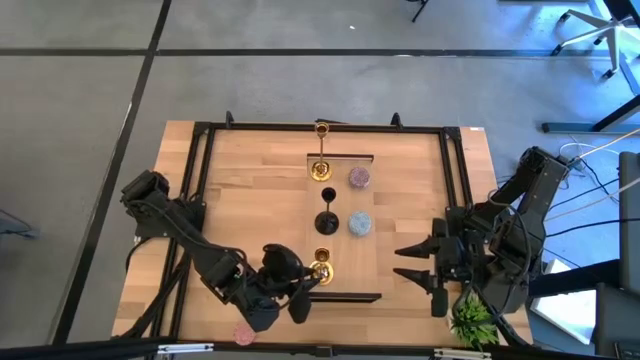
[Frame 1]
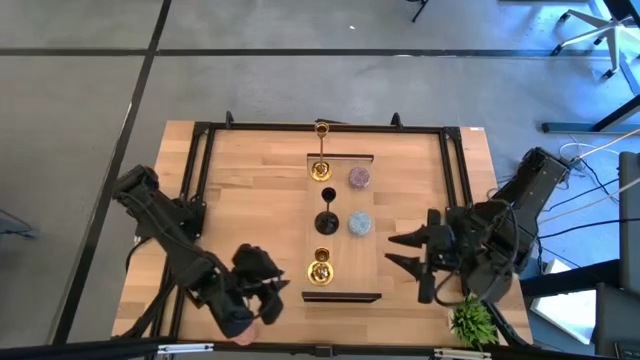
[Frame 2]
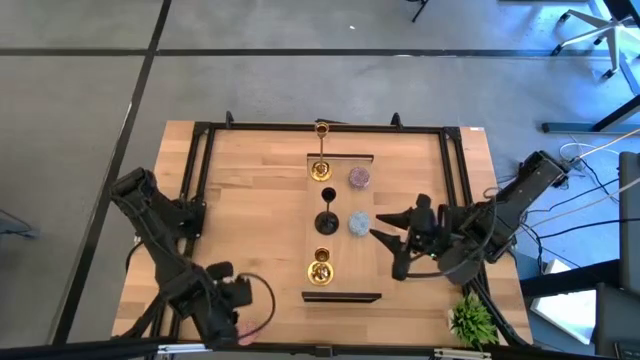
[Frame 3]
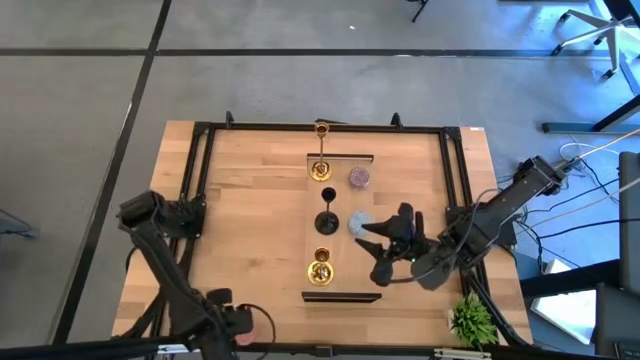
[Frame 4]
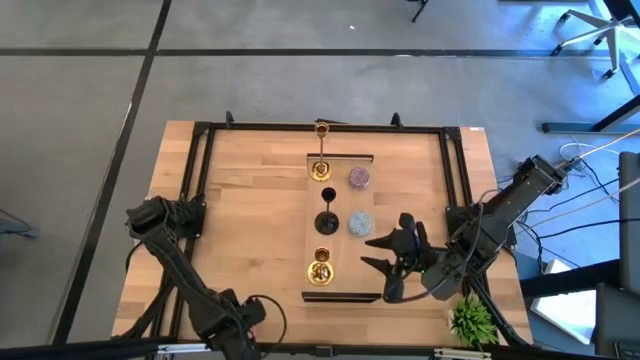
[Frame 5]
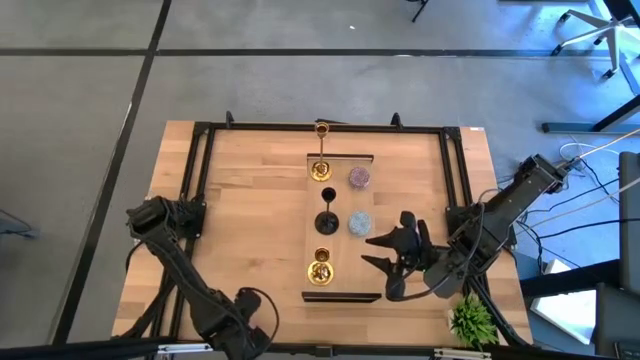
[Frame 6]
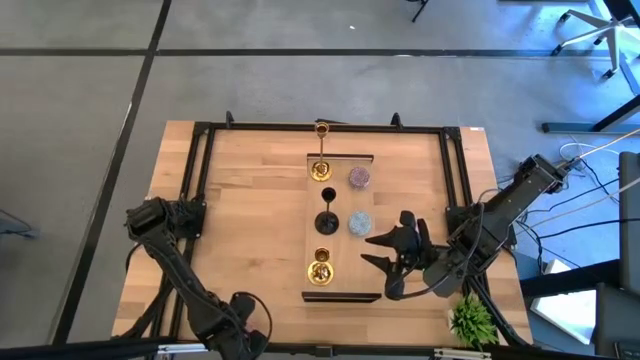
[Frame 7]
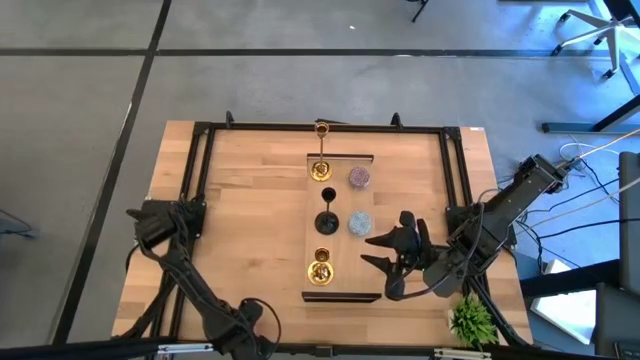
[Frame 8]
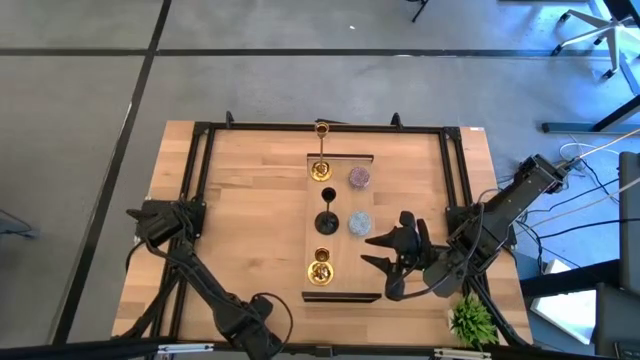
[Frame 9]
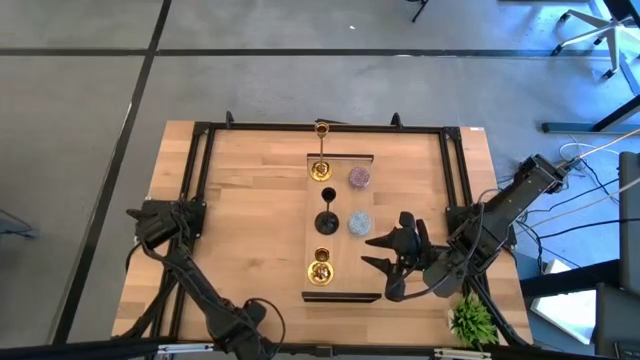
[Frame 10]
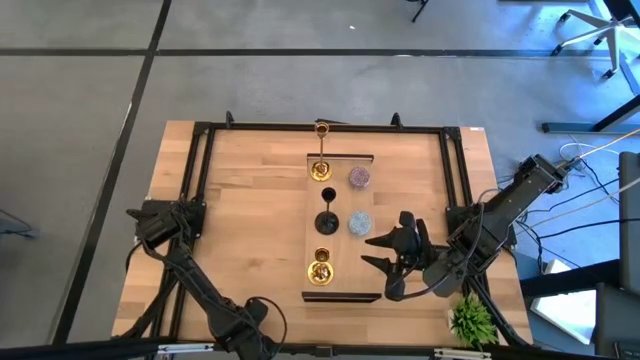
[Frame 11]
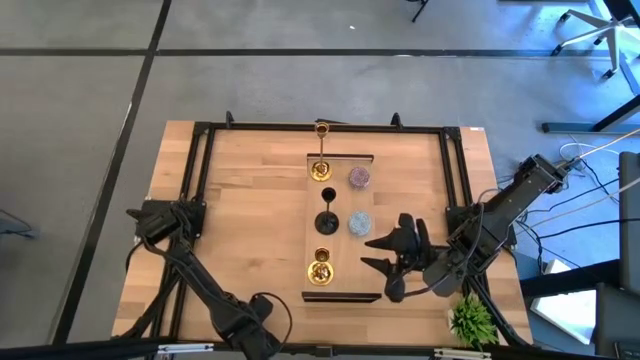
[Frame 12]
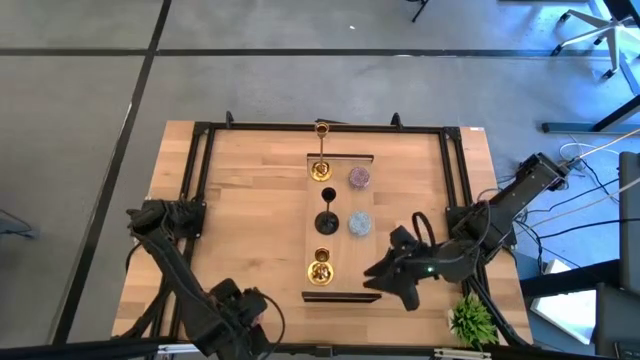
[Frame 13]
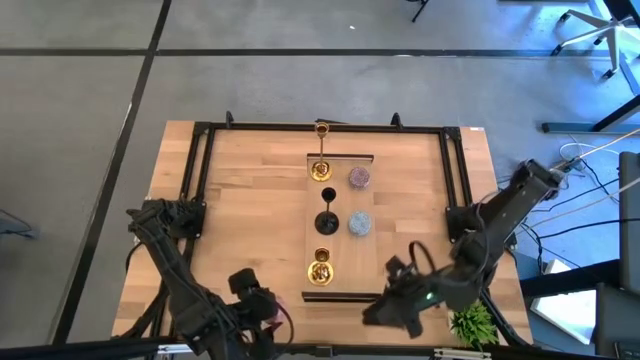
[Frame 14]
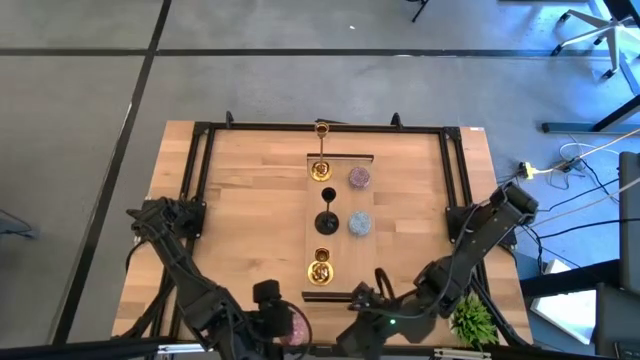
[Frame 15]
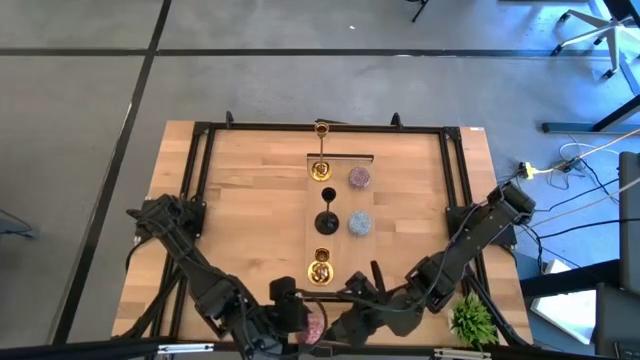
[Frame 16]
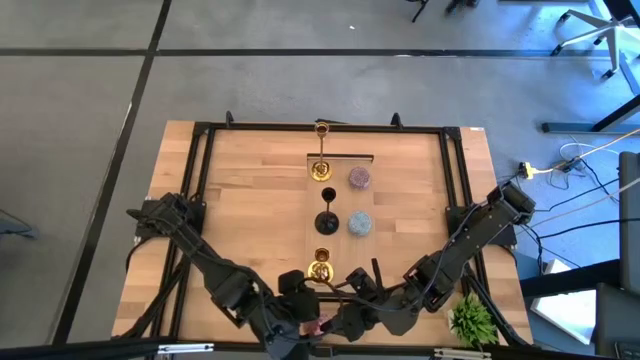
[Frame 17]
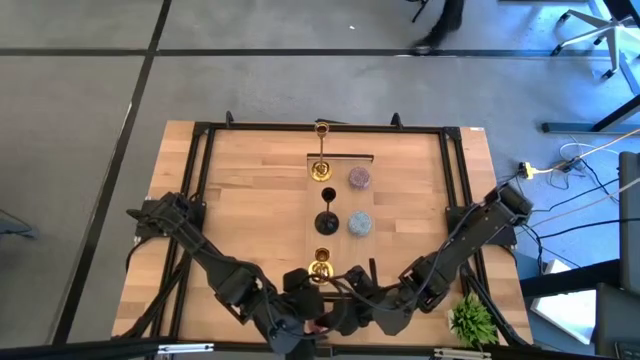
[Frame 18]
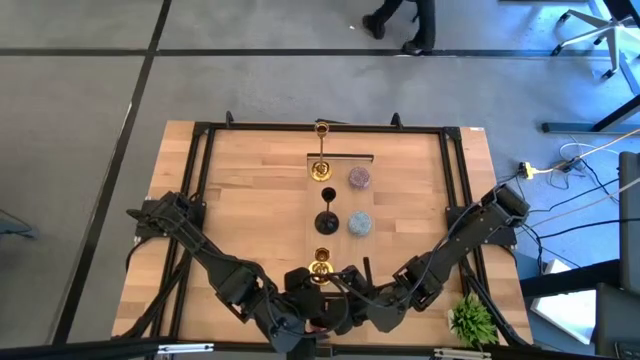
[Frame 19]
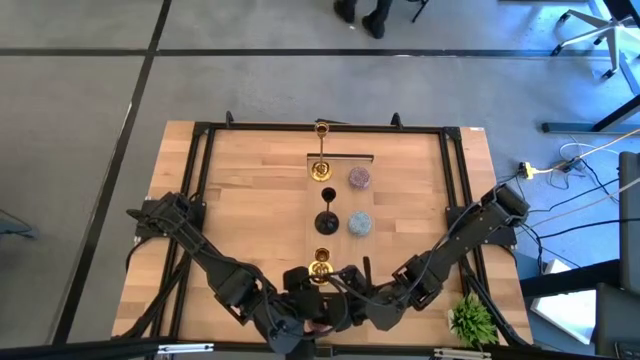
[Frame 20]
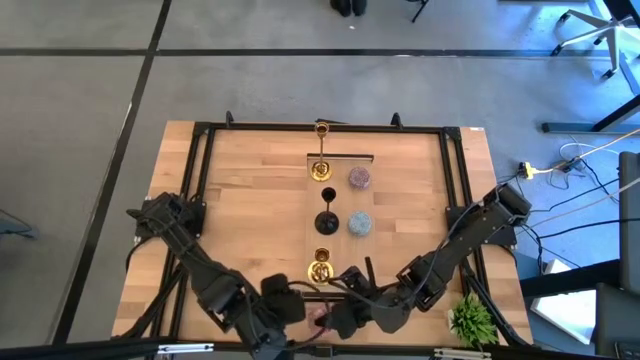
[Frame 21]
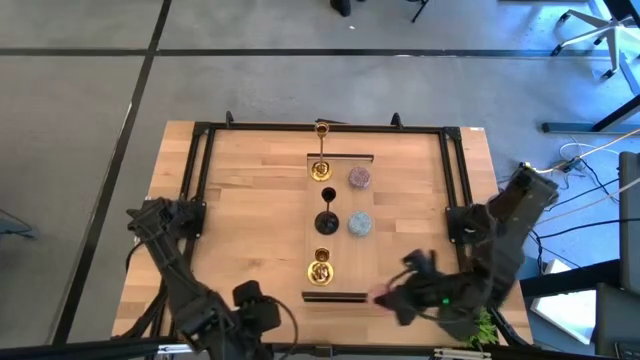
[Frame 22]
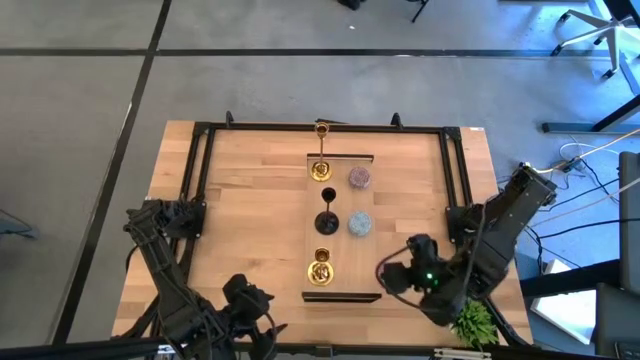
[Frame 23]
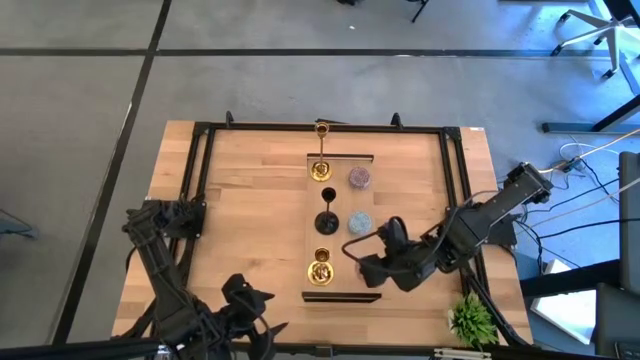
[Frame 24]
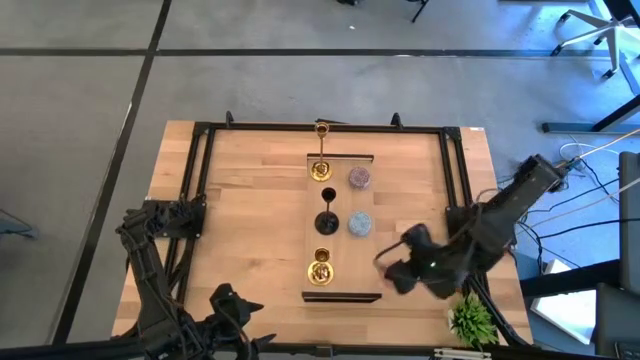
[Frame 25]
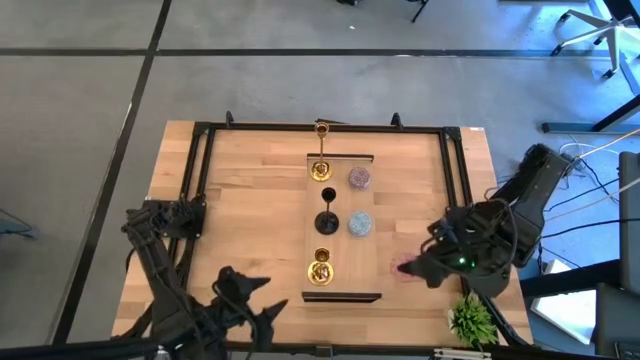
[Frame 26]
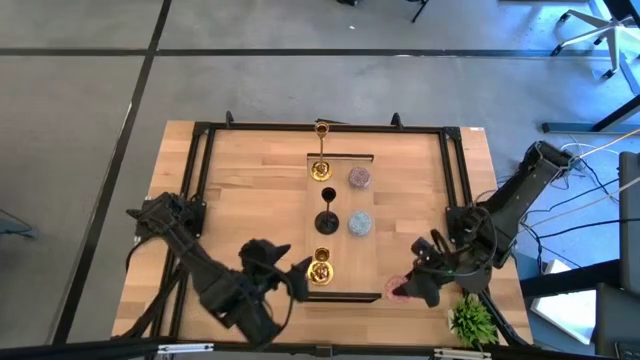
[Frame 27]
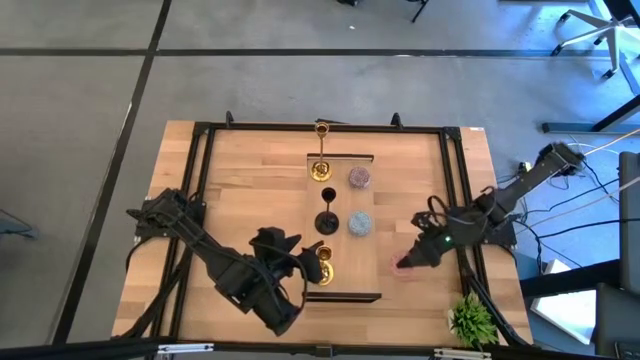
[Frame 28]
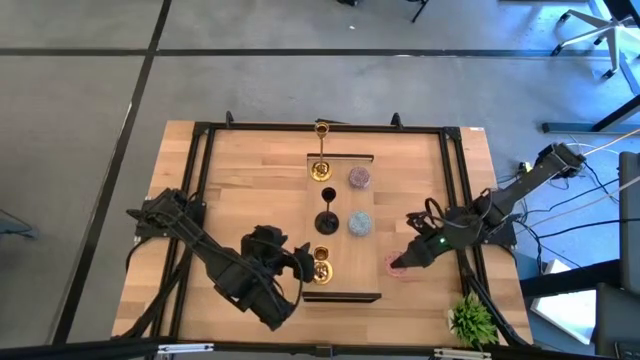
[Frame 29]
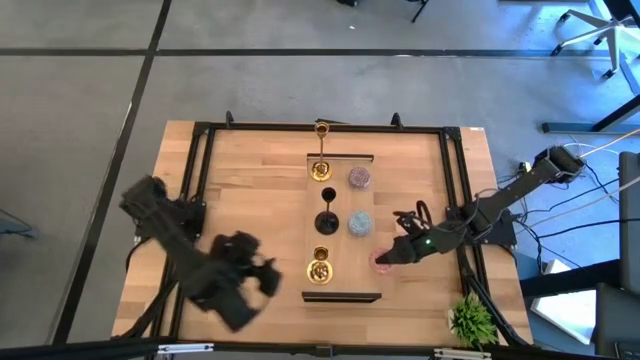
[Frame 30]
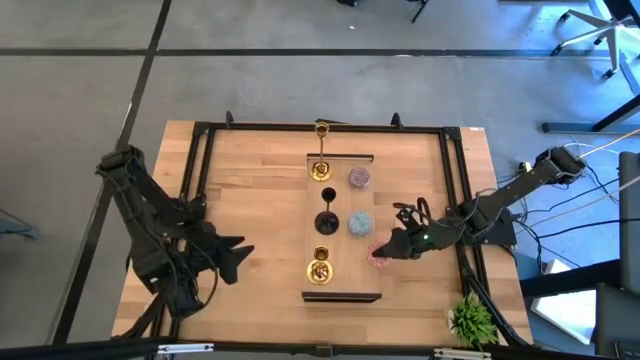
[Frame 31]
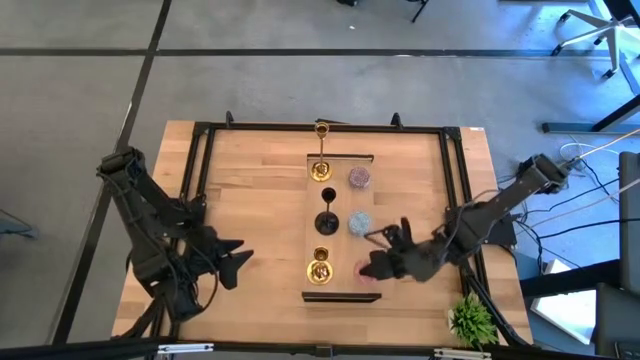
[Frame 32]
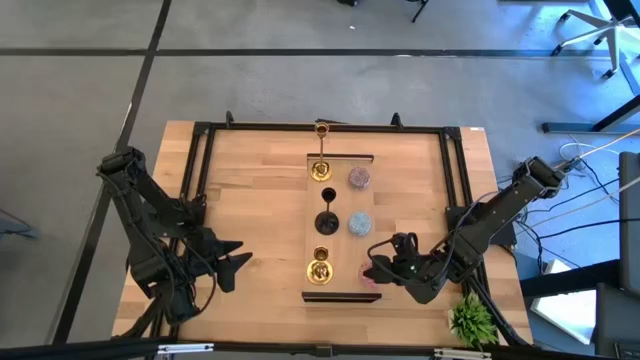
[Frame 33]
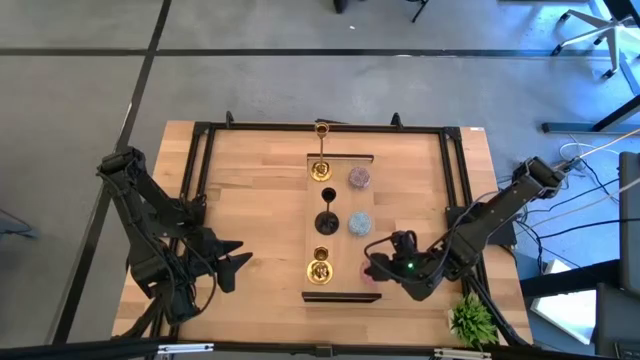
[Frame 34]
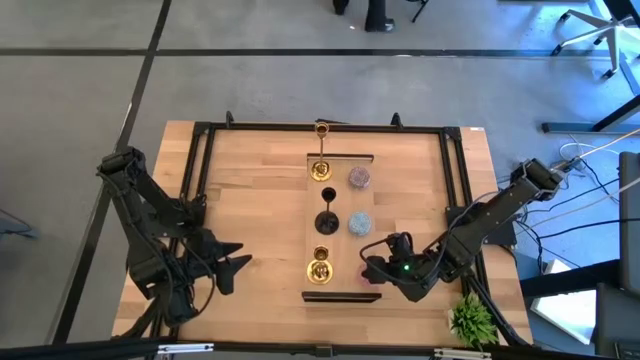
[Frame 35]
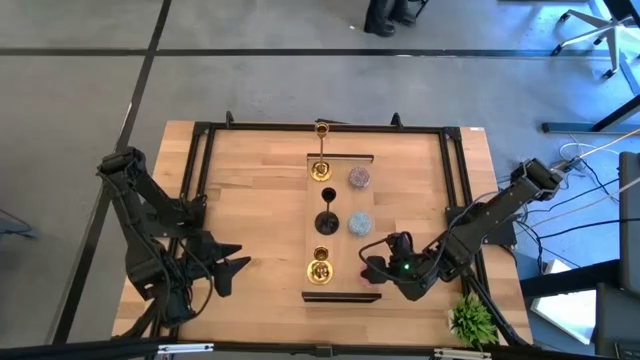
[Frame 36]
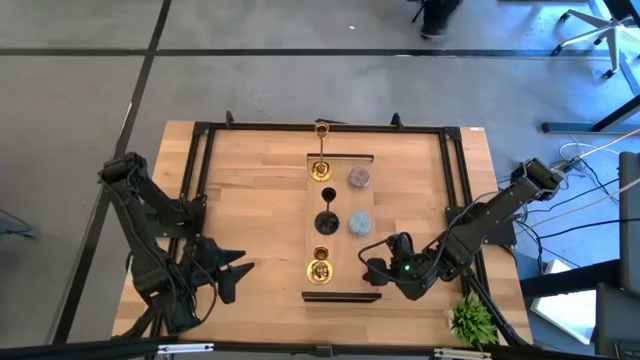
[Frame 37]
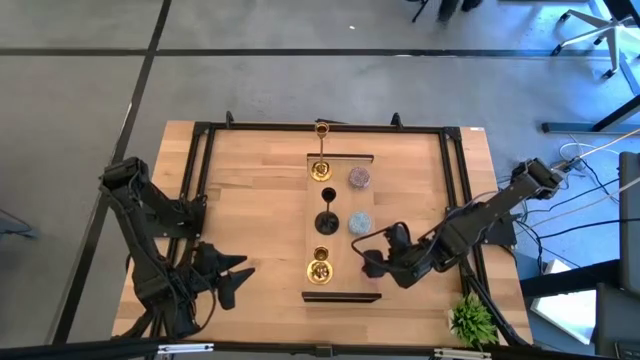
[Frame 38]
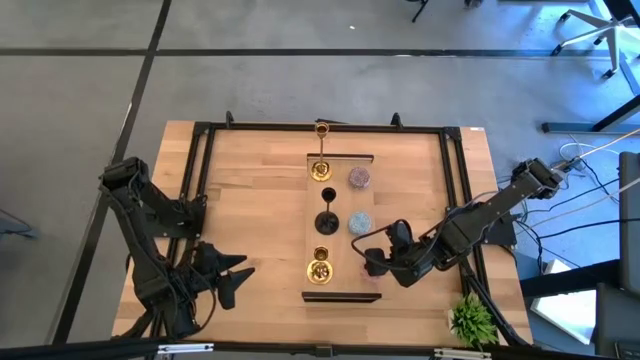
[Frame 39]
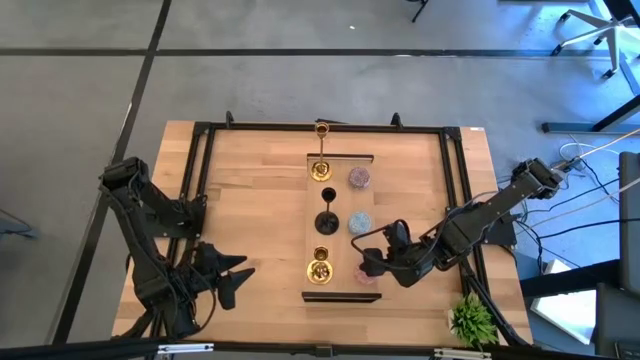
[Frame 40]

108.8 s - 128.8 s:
Task: Pick & Place candle stick holders
Put the light pink scented candle on the shelf

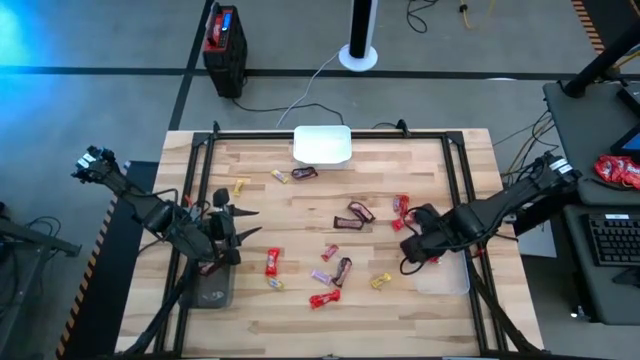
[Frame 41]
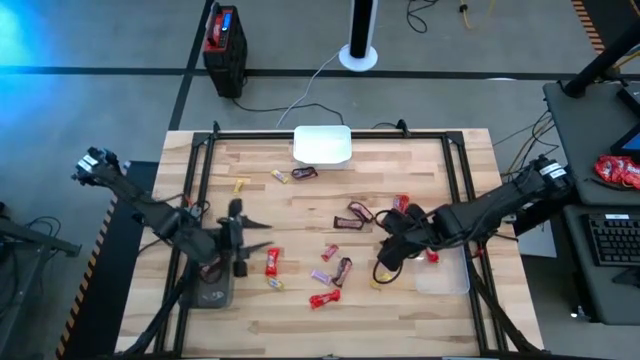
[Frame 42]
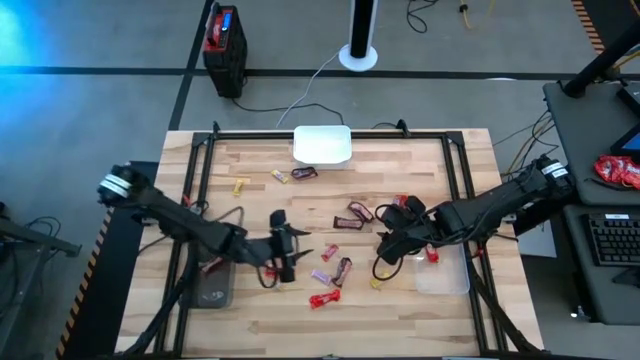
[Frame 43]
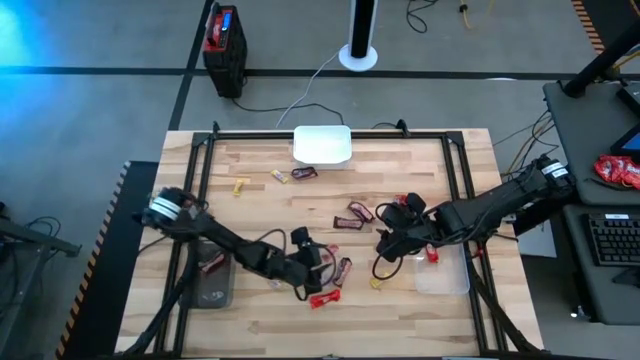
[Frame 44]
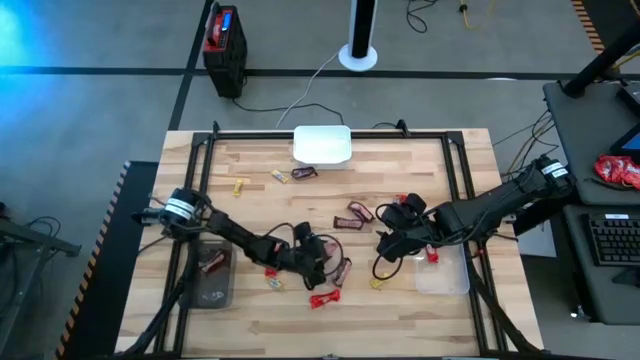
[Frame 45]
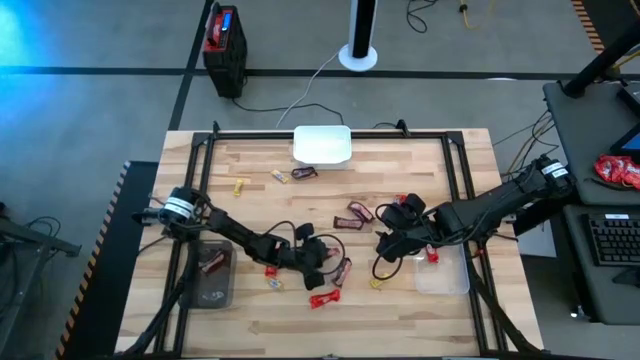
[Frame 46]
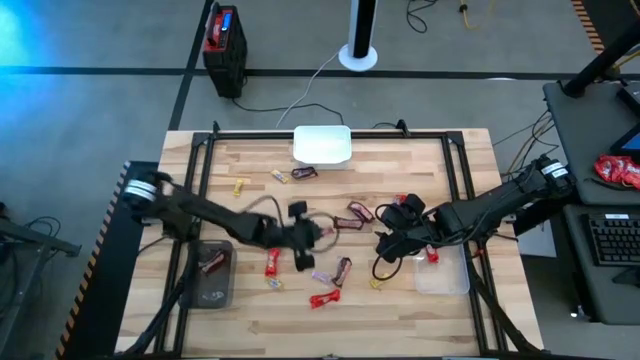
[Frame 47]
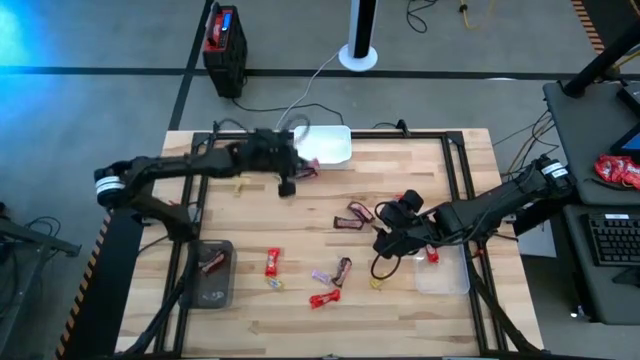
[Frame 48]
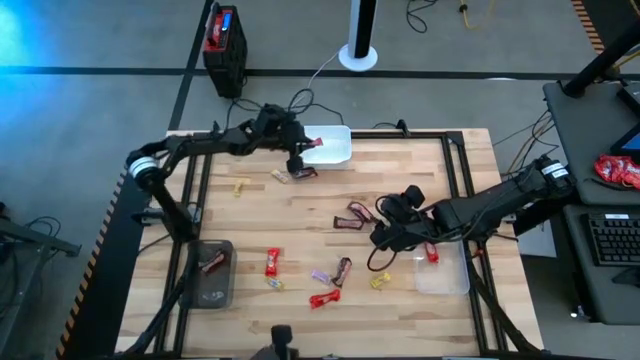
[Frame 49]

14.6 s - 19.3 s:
Task: Sort candy by brand, put in halloween buckets
Put the red candy into the white bin
